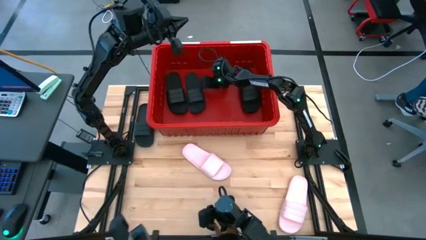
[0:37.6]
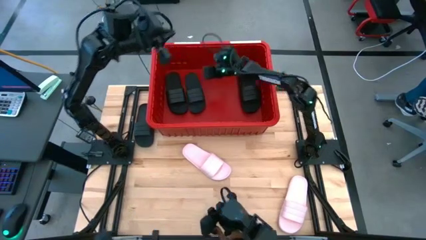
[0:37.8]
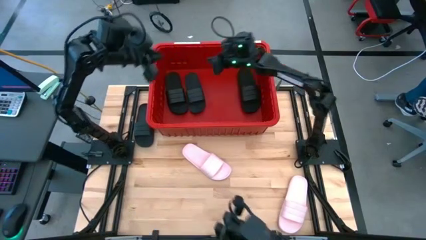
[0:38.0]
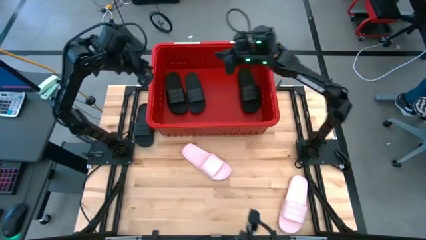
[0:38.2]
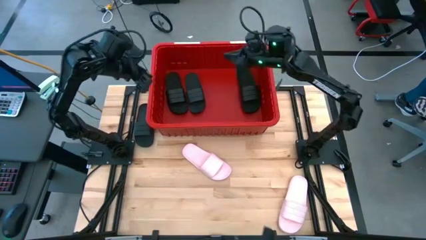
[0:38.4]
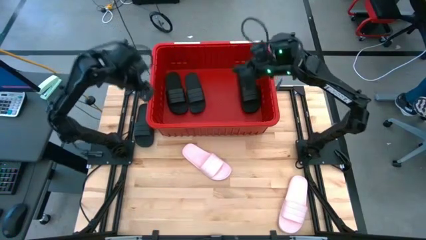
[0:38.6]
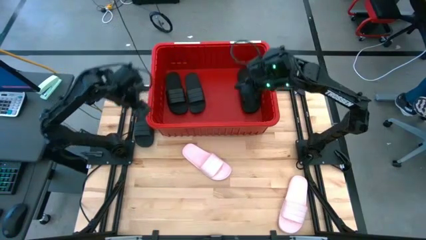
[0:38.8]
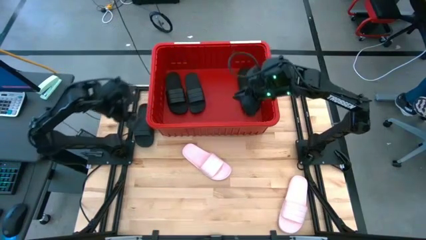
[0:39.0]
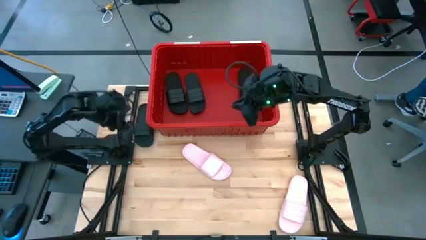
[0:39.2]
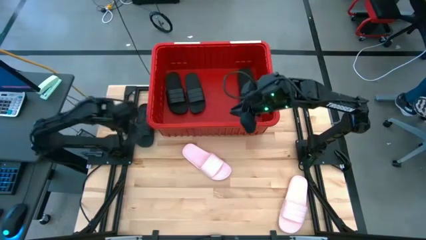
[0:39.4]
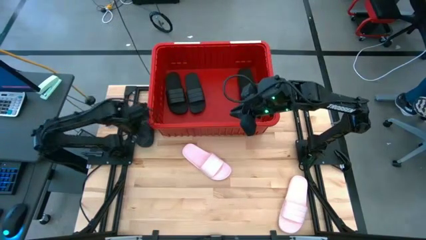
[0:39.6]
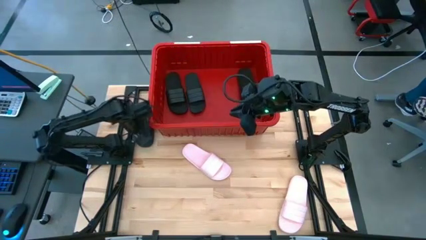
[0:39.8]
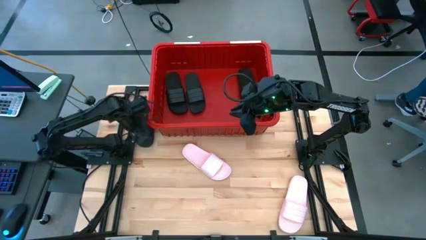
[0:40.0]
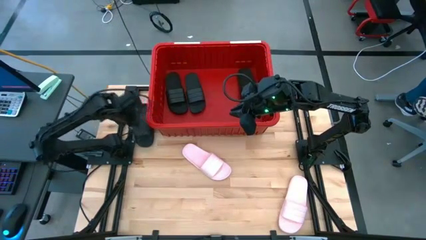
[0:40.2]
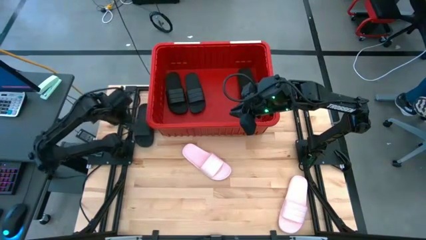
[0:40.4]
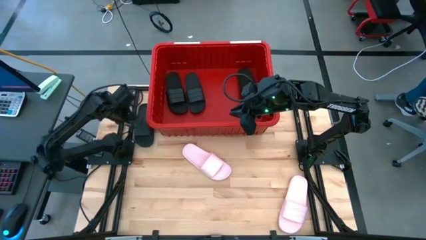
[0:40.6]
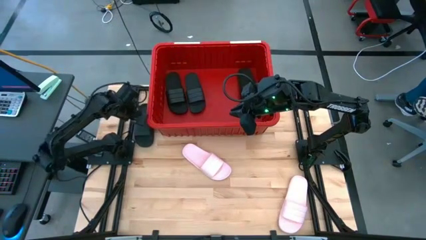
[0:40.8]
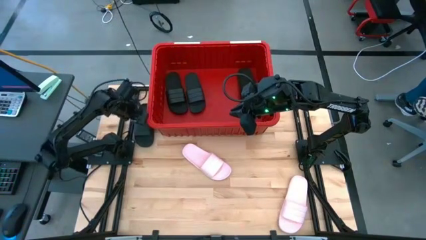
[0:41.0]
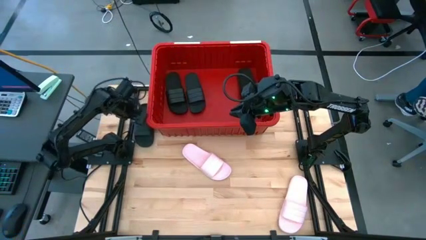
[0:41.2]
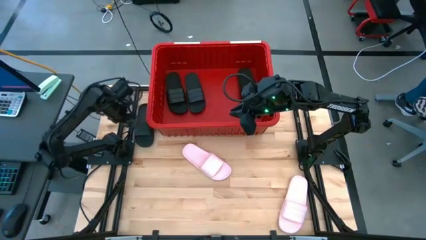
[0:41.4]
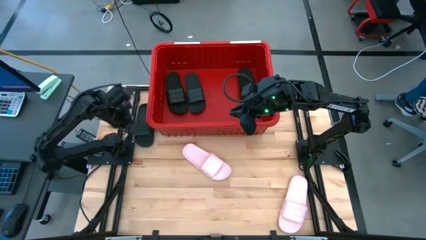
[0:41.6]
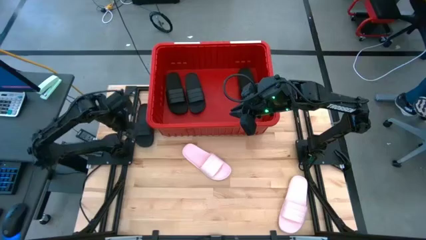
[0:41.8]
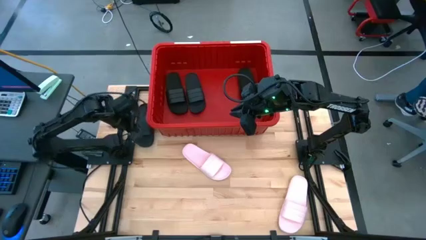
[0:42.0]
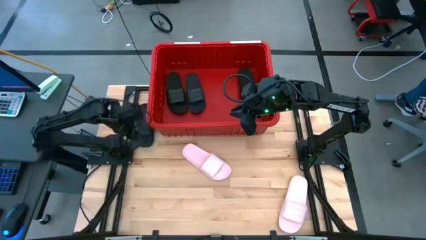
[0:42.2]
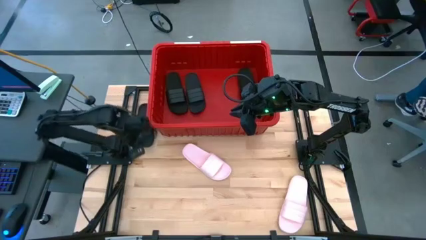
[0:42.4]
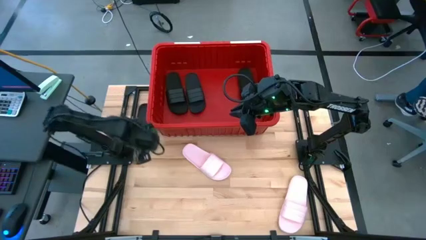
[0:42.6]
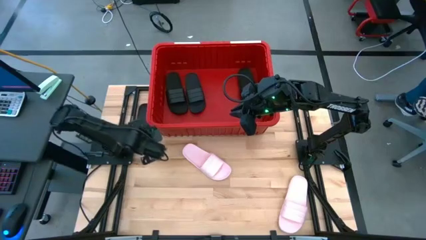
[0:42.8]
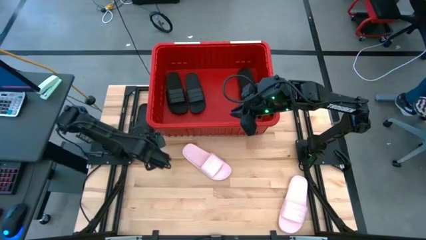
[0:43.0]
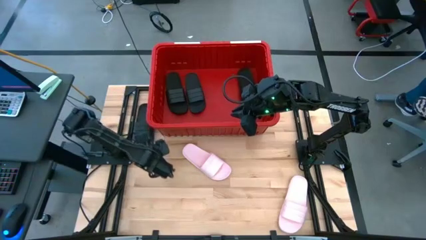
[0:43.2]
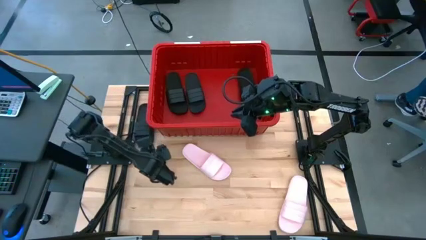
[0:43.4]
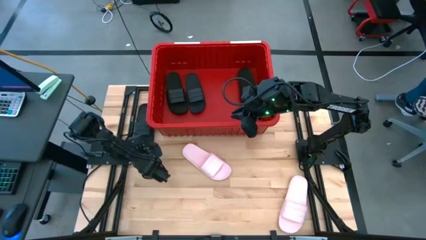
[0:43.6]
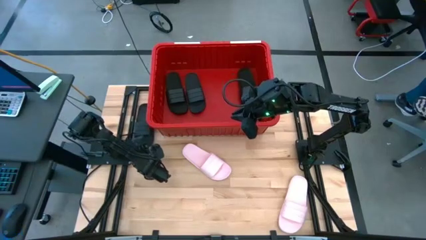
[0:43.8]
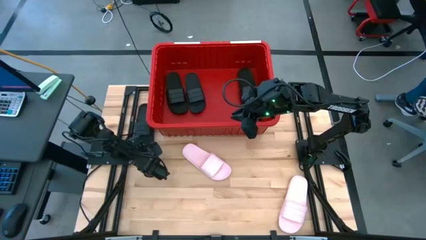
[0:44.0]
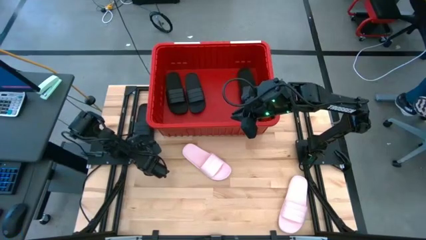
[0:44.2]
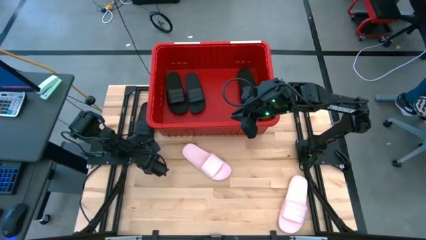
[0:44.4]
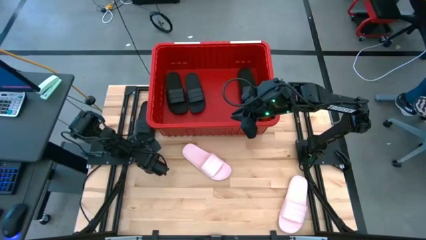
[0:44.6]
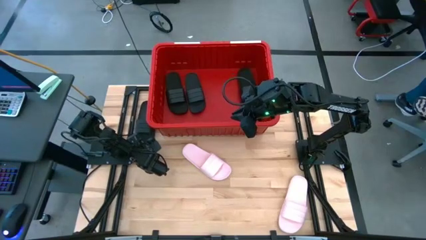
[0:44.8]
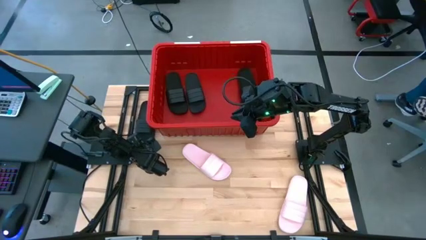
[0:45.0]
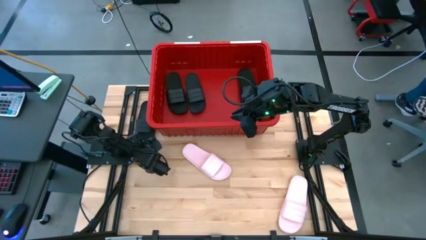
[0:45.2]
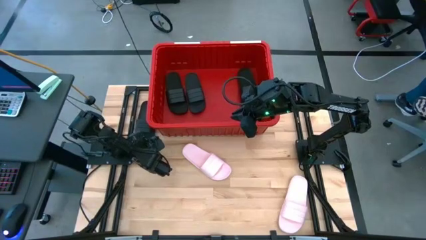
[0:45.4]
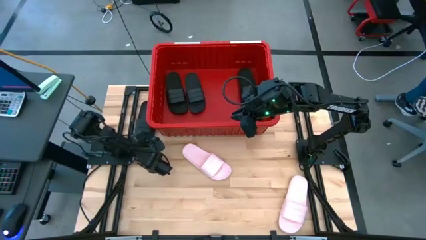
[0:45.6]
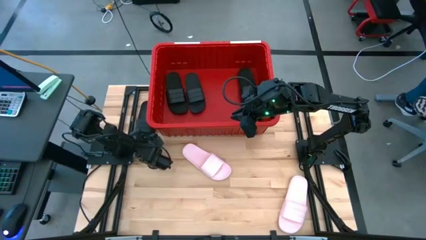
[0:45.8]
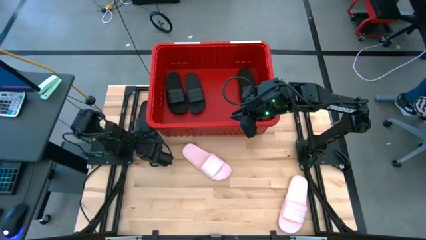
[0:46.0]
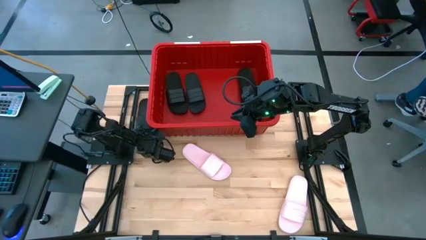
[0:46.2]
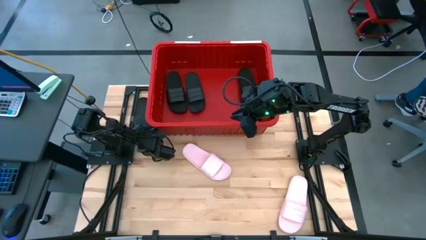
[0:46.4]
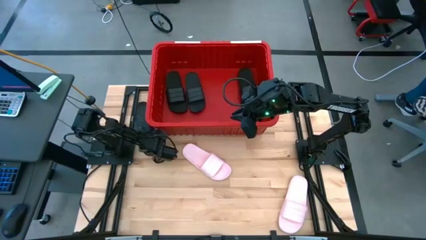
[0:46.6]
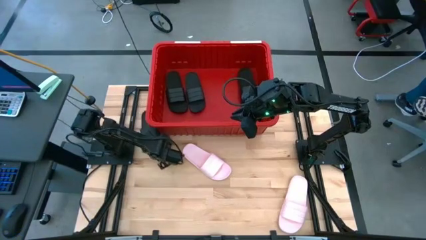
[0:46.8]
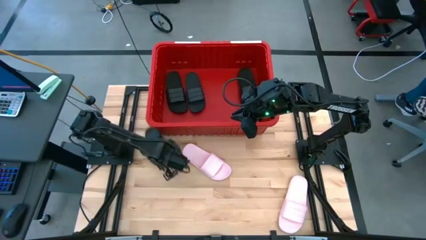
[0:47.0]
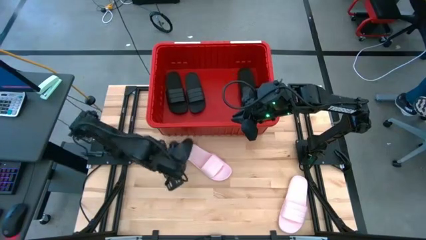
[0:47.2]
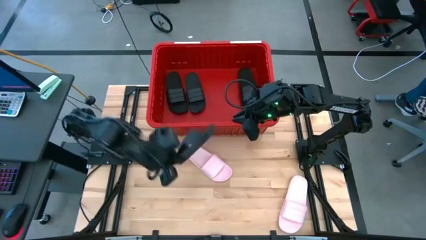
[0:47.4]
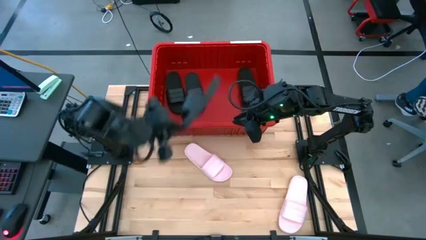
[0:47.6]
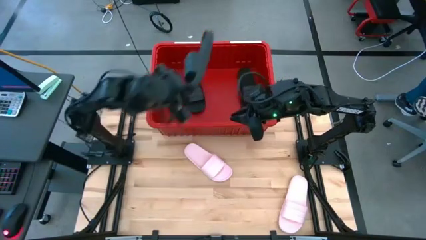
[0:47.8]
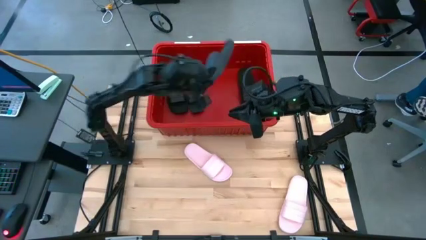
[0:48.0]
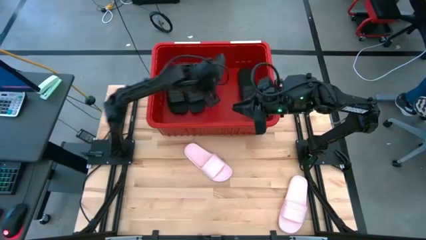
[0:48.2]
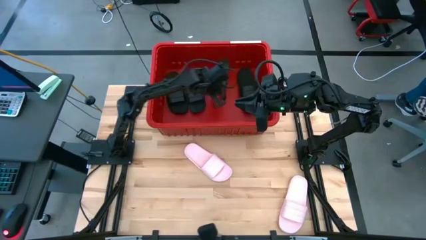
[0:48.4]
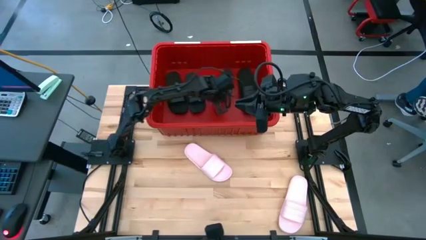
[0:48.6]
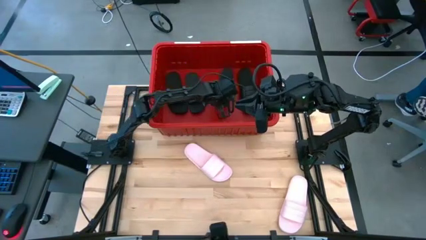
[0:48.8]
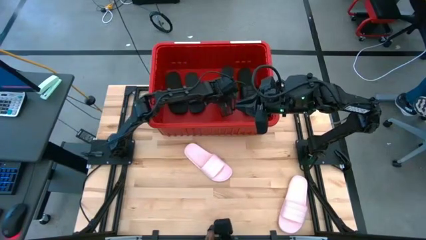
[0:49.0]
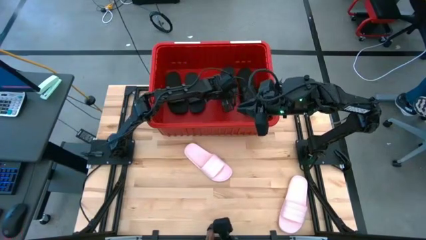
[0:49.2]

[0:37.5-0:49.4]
Task: Pick and place slides into bin
Put the black slide into the bin

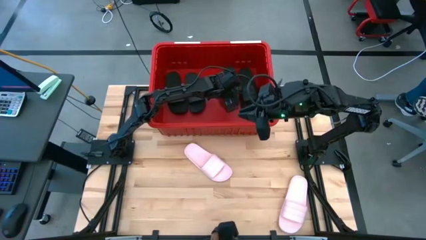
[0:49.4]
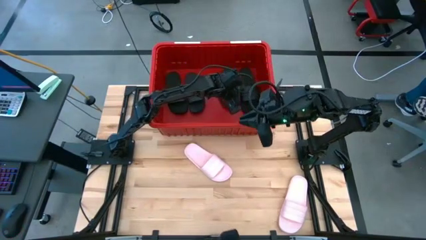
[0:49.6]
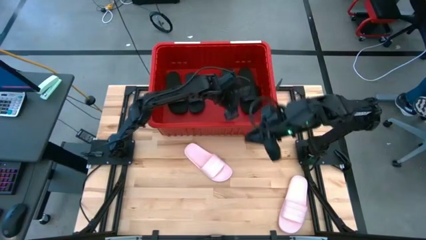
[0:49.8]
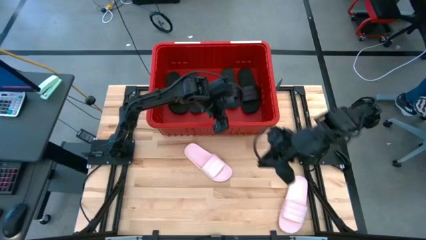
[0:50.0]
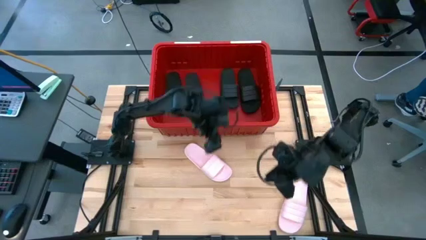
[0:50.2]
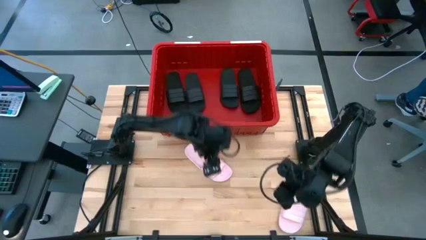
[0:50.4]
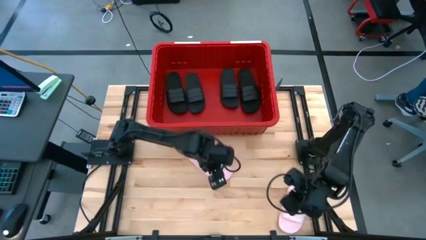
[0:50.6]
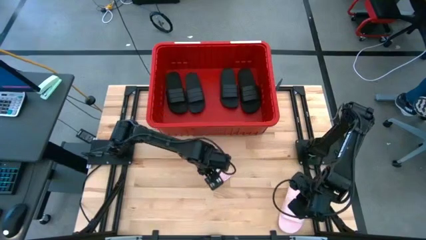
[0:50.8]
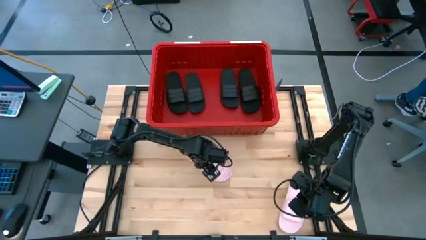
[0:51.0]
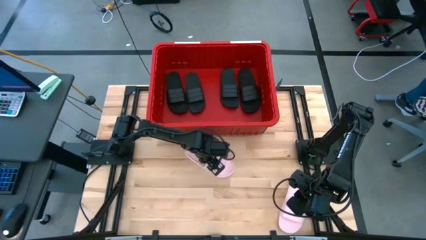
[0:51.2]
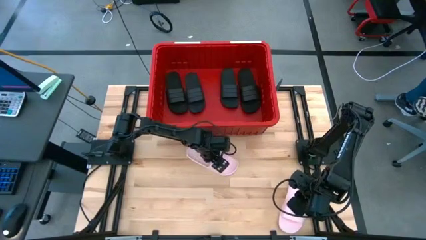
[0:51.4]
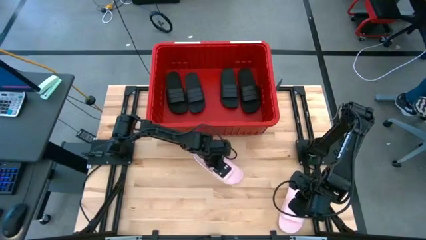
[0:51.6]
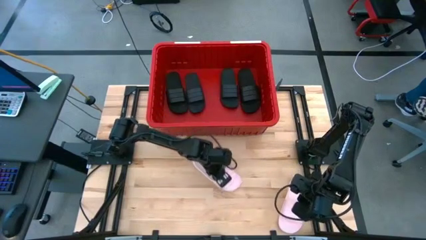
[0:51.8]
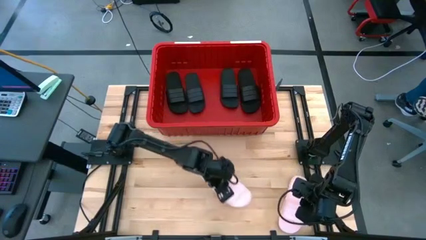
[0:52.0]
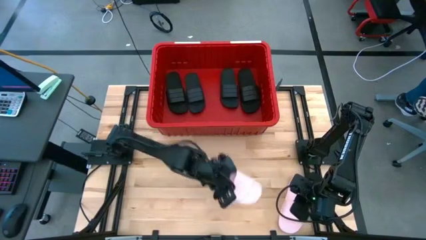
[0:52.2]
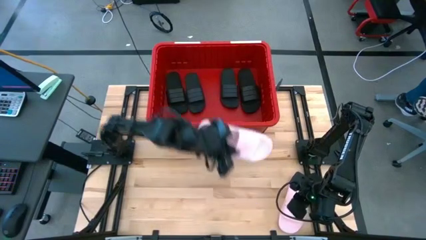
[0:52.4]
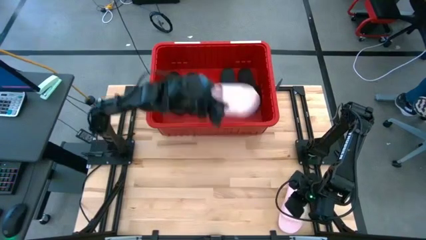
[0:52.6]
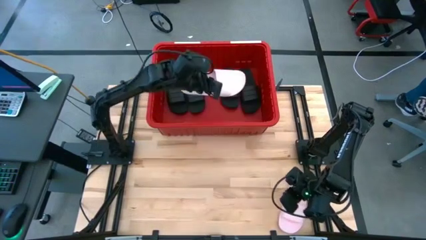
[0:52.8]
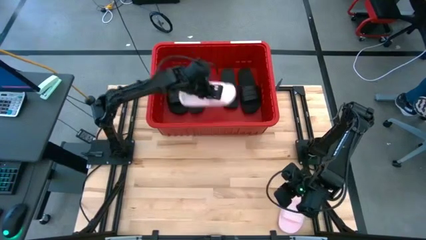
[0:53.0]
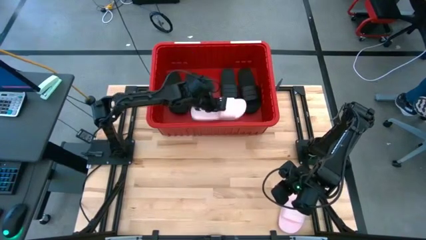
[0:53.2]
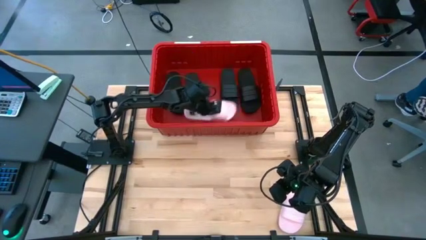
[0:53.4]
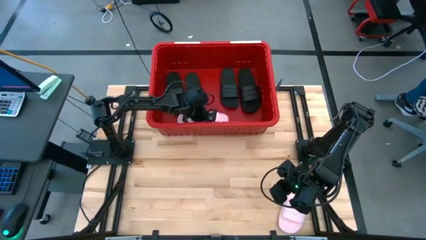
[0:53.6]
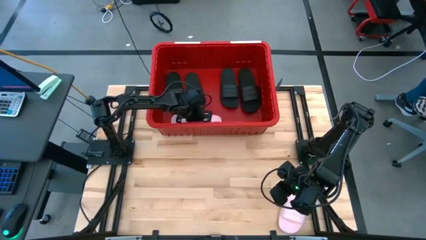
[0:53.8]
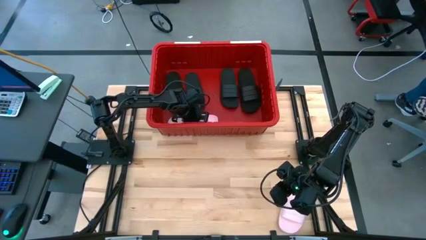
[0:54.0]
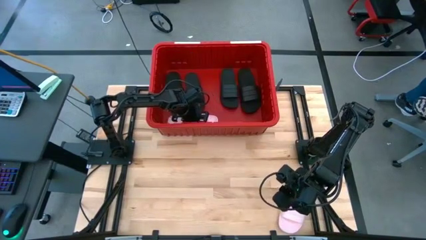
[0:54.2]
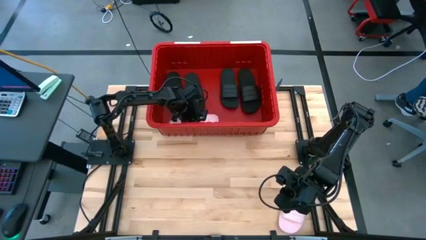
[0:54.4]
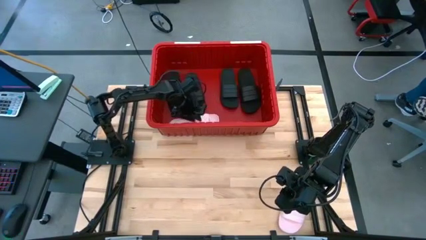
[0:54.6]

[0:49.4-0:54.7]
Put the pink slide into the red bin
